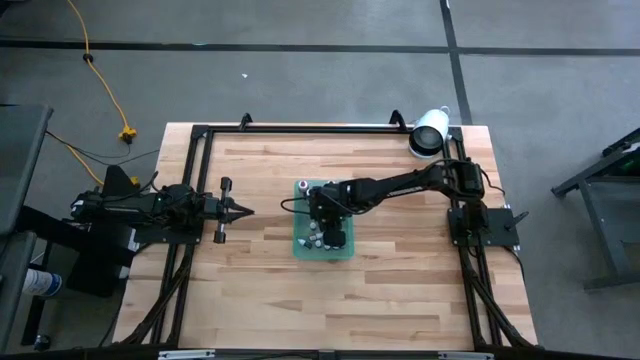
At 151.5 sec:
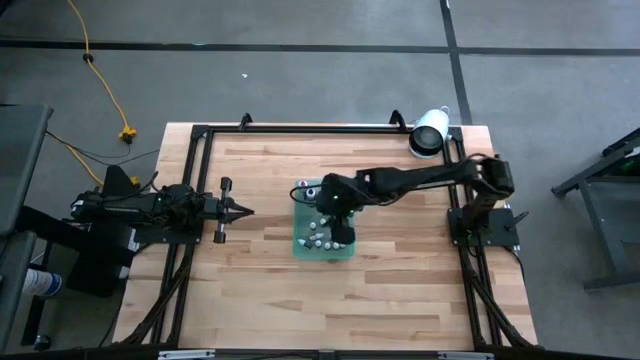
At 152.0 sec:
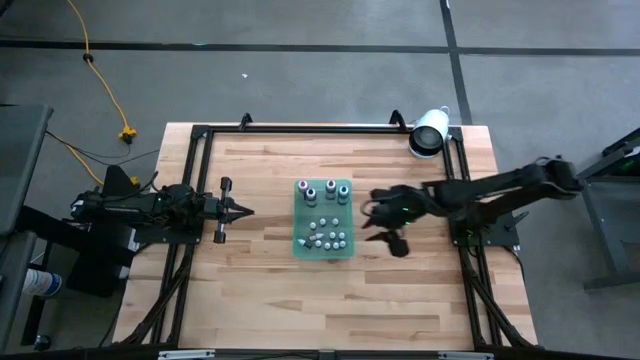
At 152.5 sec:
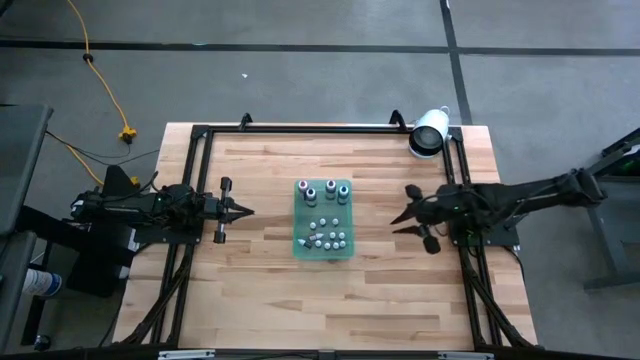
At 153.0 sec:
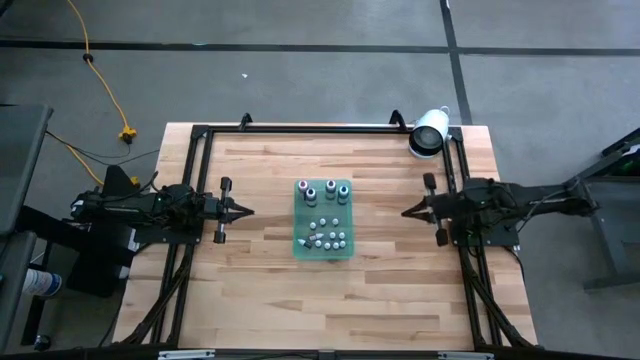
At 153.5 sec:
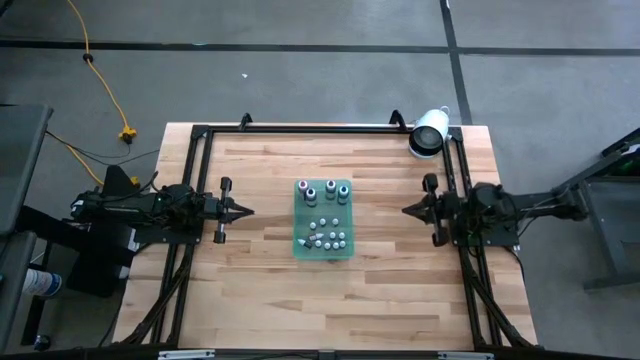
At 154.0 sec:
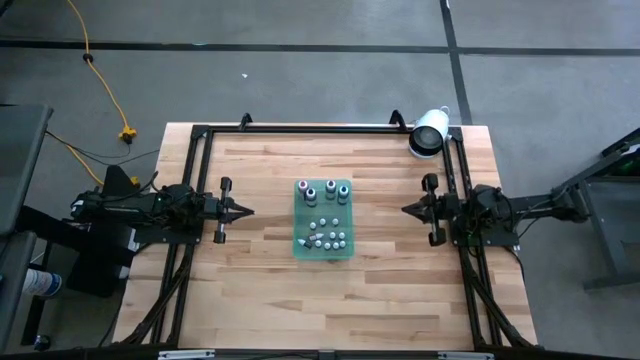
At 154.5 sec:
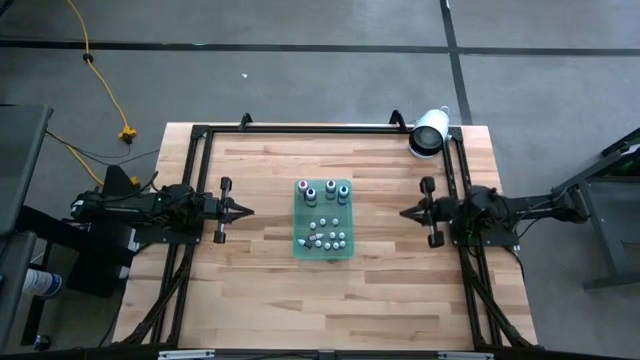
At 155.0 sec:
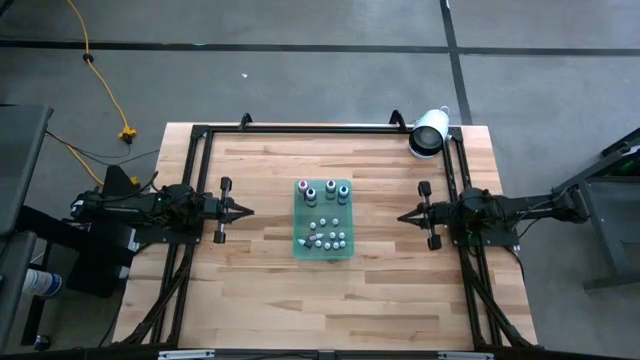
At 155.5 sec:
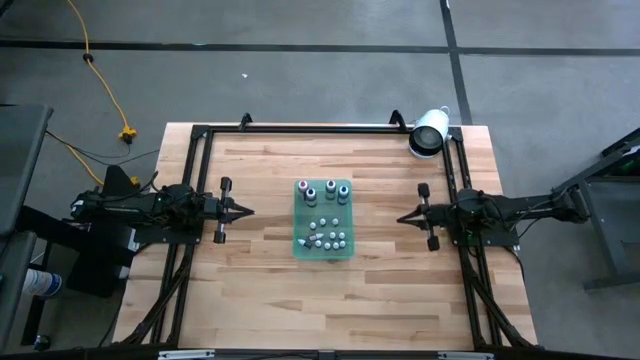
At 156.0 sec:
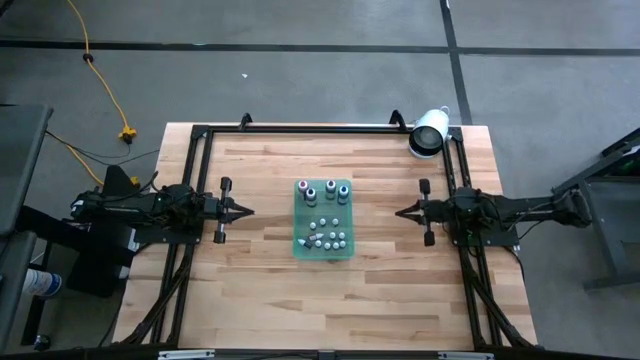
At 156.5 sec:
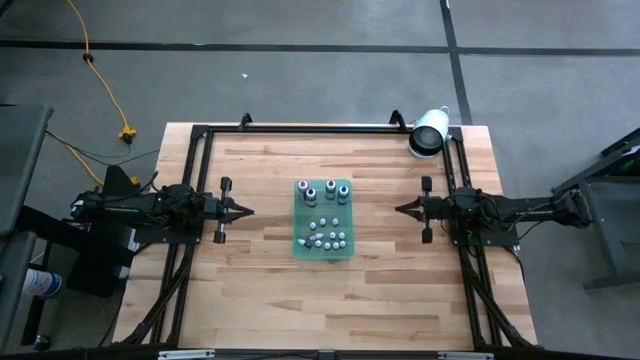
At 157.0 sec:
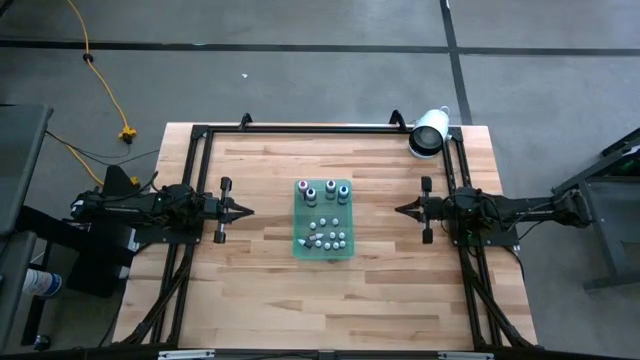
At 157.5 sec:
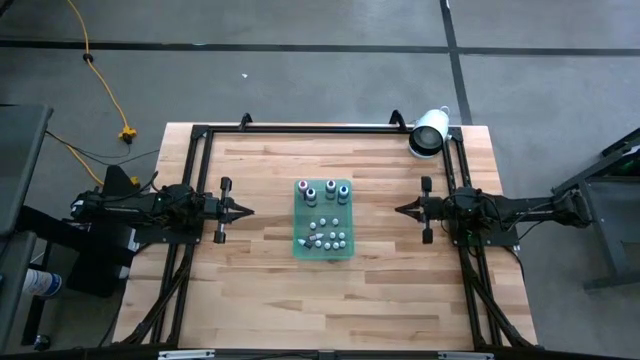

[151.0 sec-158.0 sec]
Task: Pick & Place food coloring
Return to Home Position

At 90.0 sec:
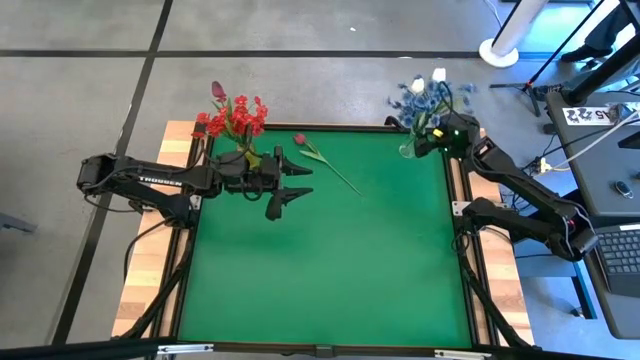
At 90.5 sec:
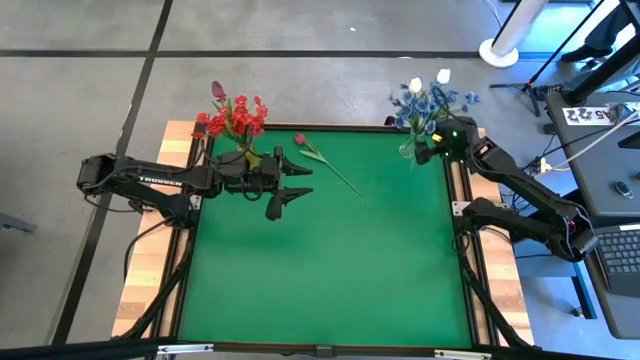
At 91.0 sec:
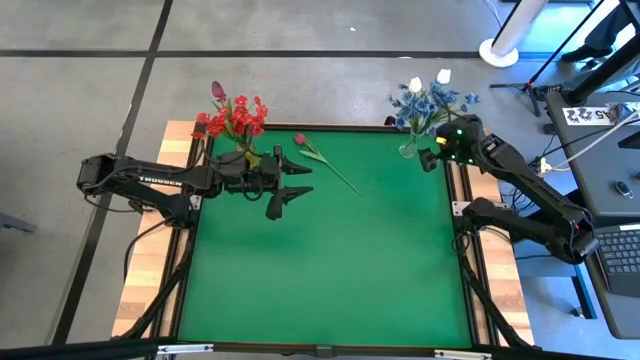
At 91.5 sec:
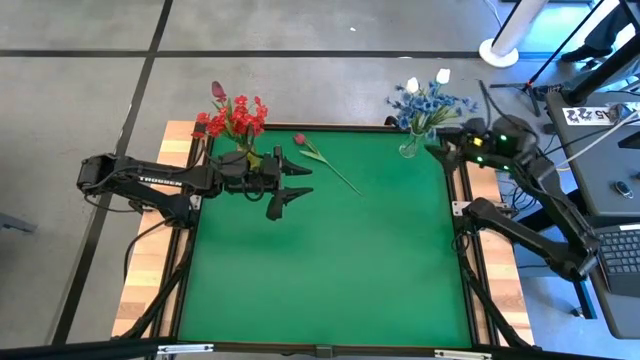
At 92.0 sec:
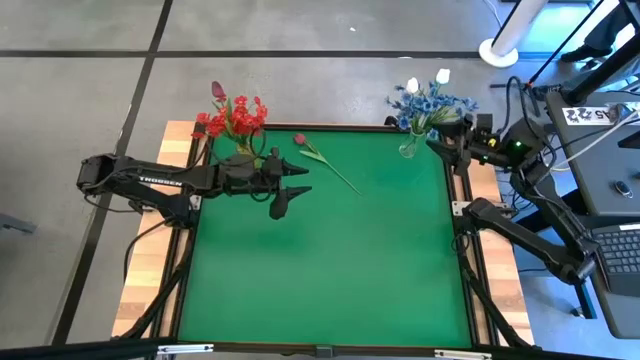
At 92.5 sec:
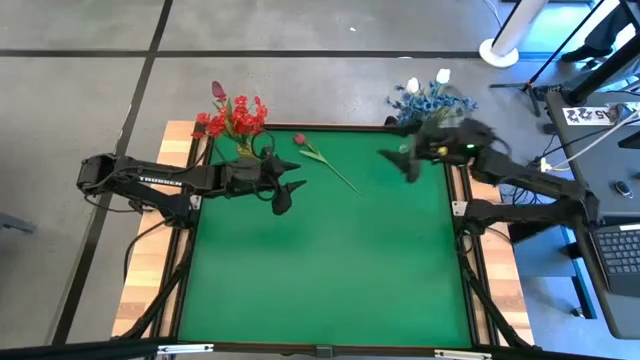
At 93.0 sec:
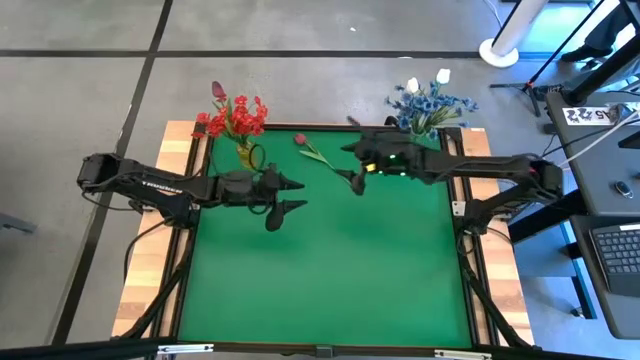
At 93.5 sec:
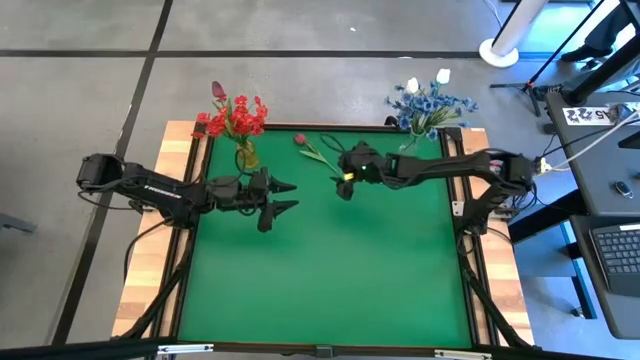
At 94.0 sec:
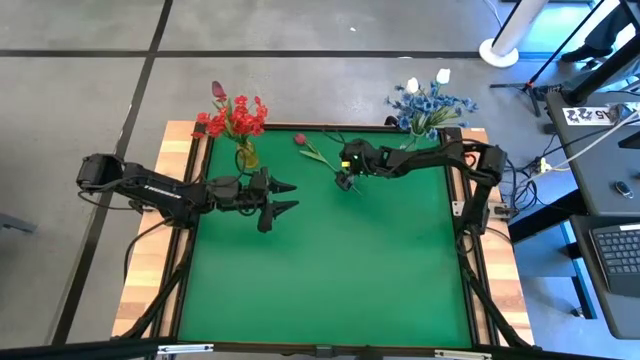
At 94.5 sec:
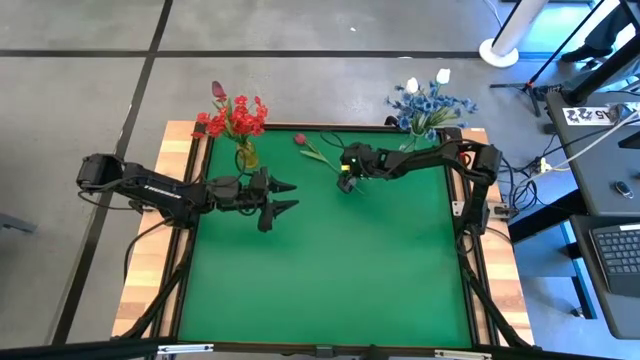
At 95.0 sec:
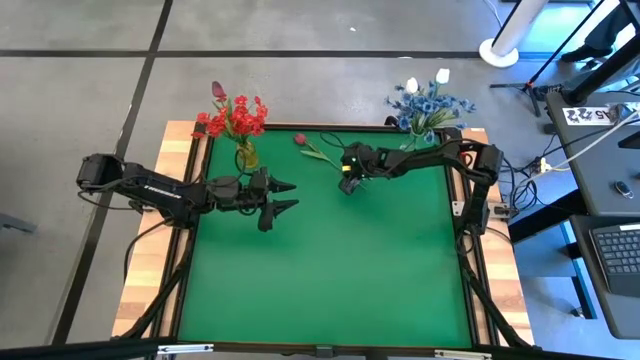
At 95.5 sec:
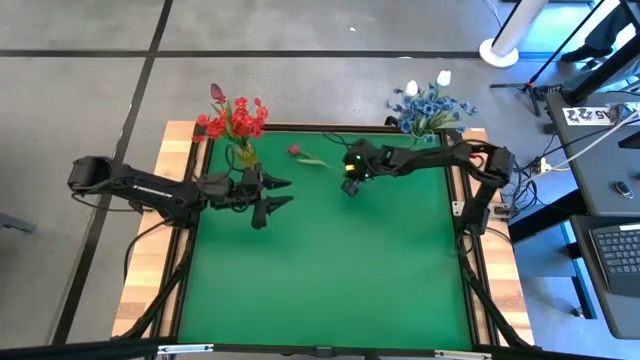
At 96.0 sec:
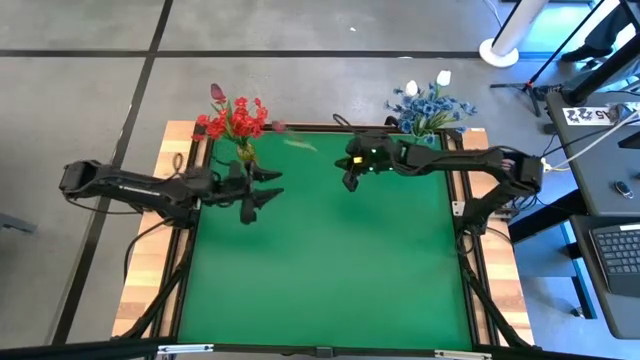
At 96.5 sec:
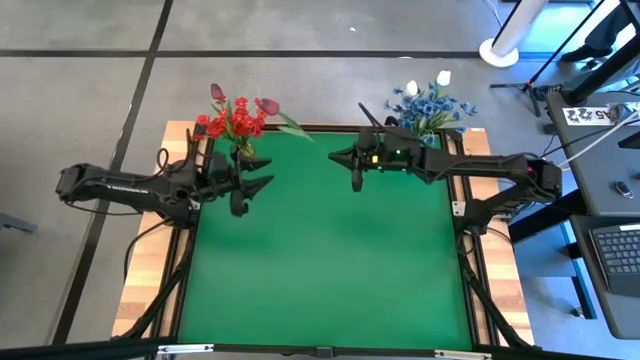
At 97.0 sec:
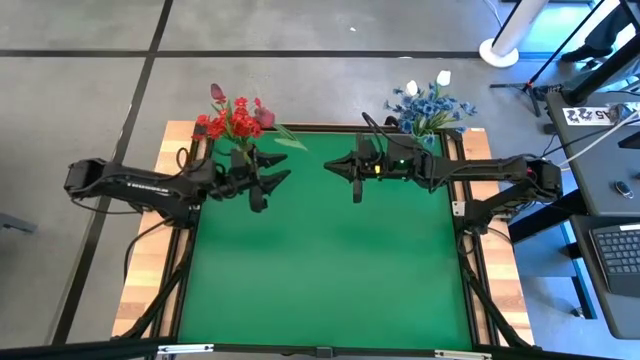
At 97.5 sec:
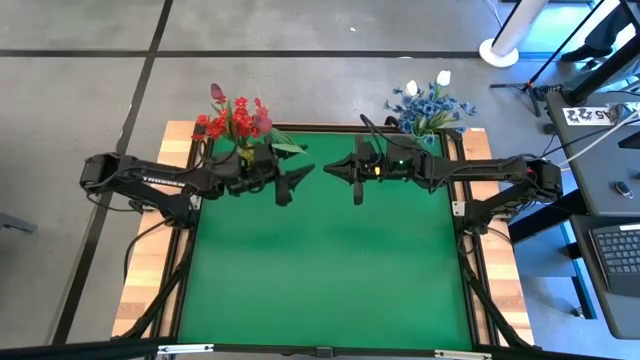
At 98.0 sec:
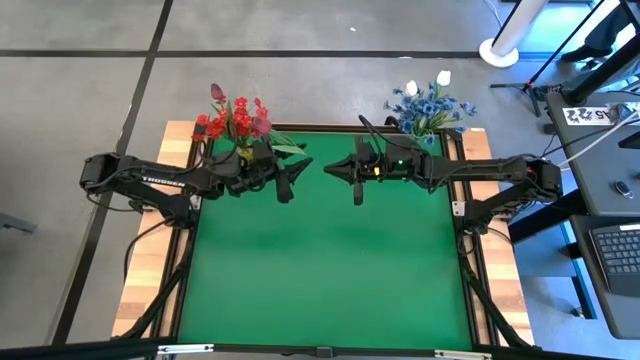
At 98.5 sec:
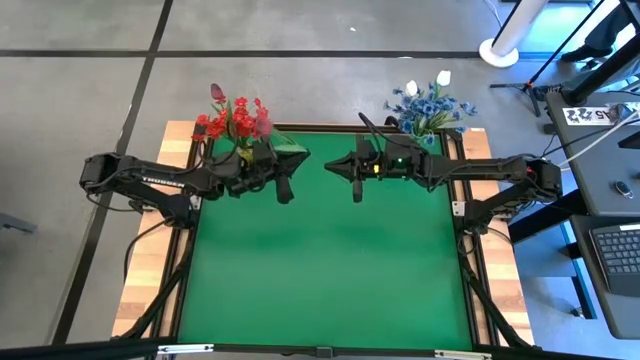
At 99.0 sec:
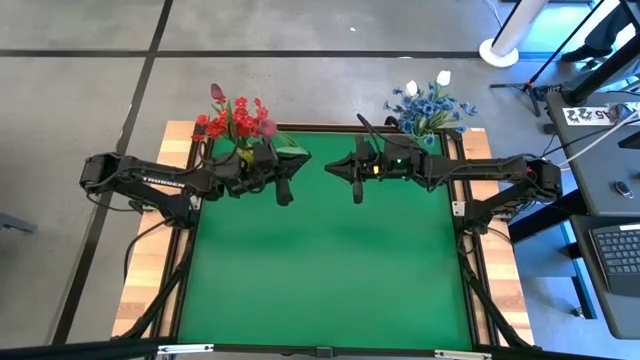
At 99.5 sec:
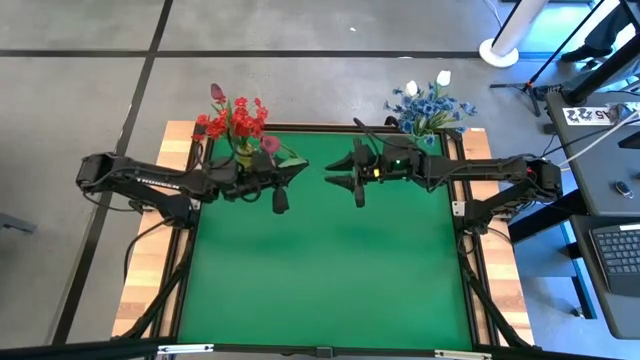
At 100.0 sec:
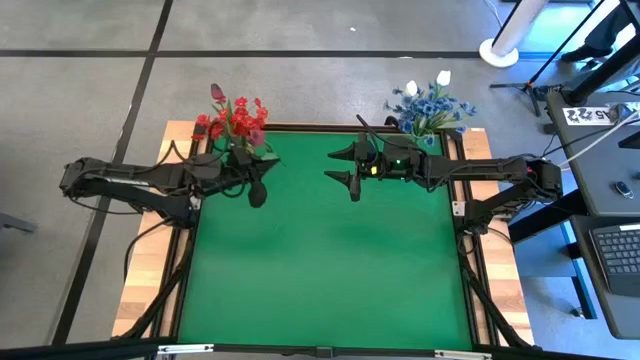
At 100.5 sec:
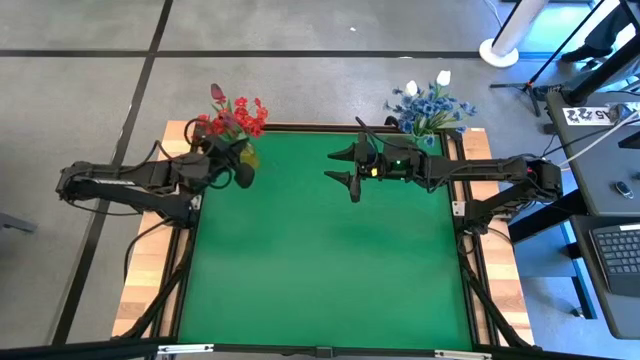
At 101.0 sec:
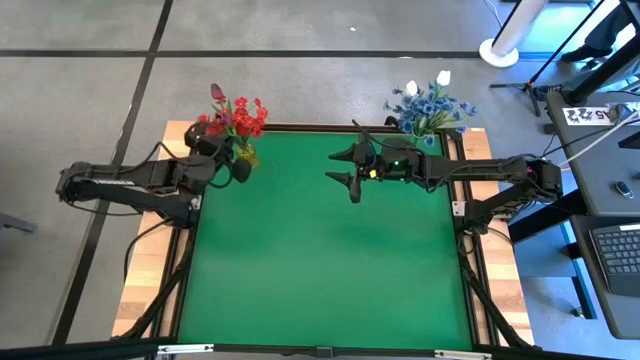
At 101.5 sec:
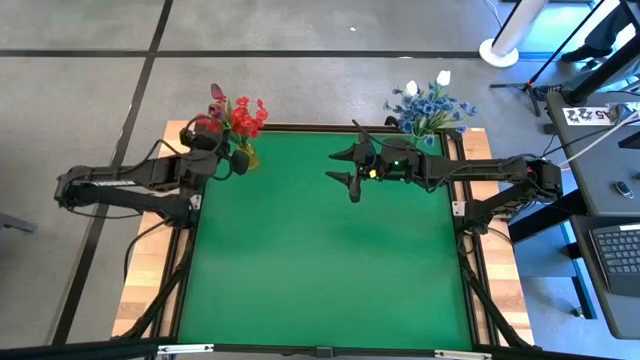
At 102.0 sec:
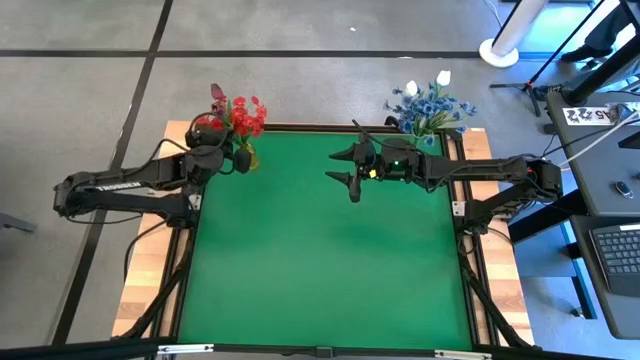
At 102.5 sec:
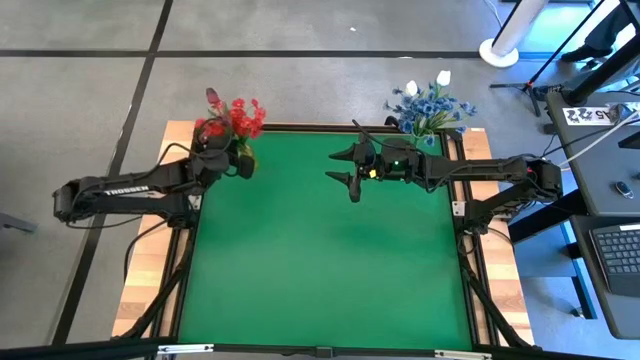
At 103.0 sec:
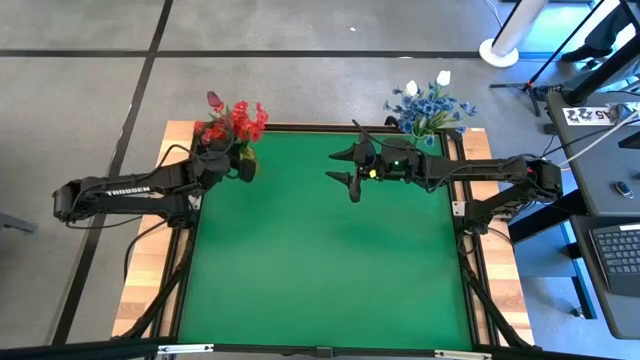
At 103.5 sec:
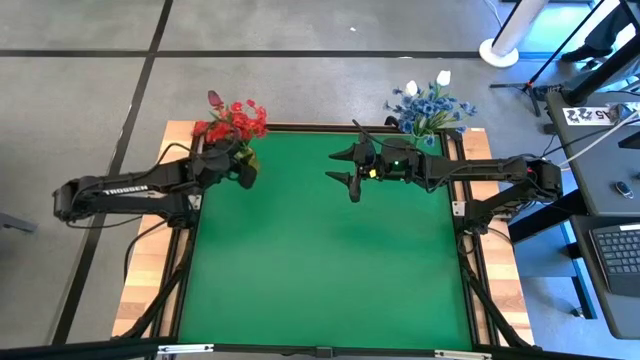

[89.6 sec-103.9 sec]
Task: Sort flowers into vase by color
Put the red flower into the yellow vase
